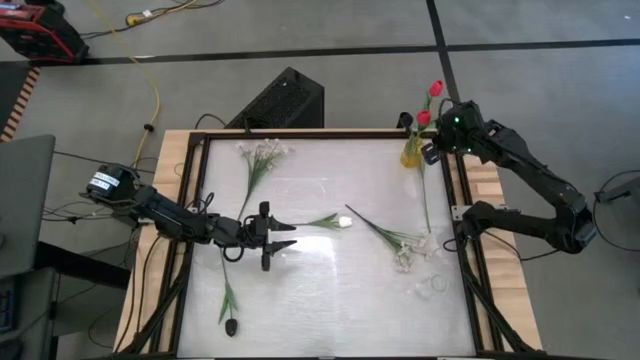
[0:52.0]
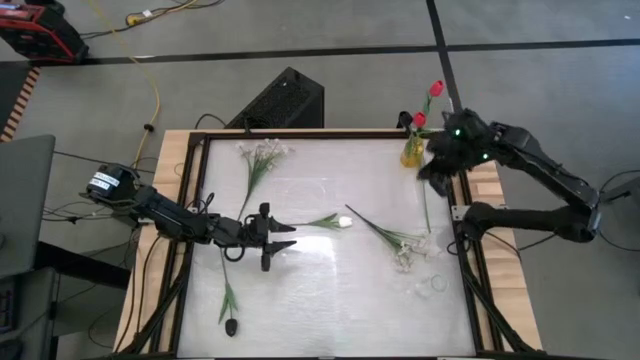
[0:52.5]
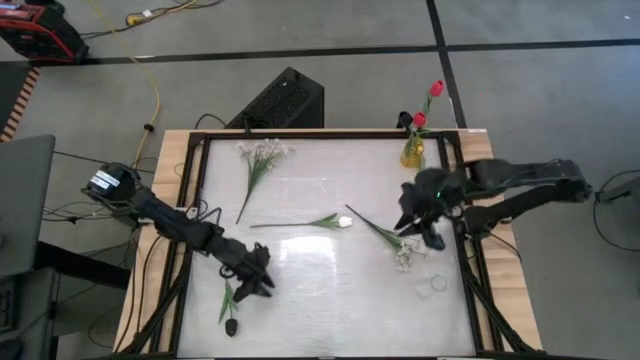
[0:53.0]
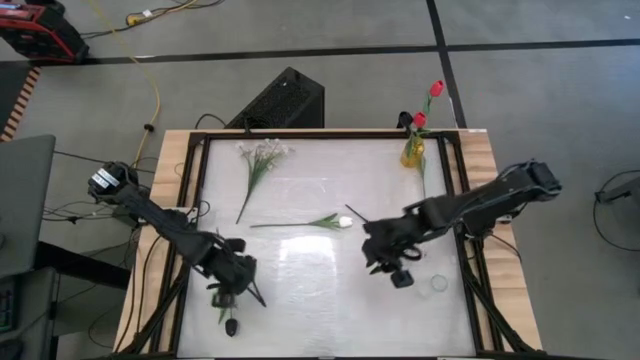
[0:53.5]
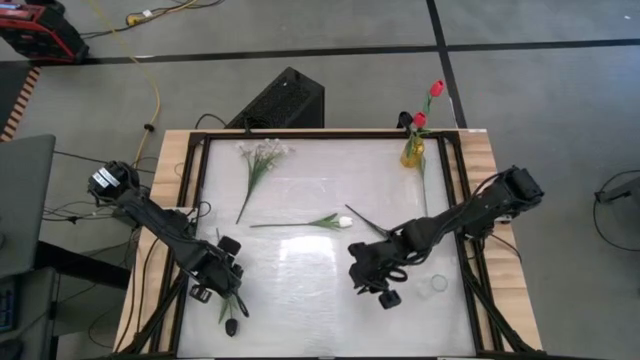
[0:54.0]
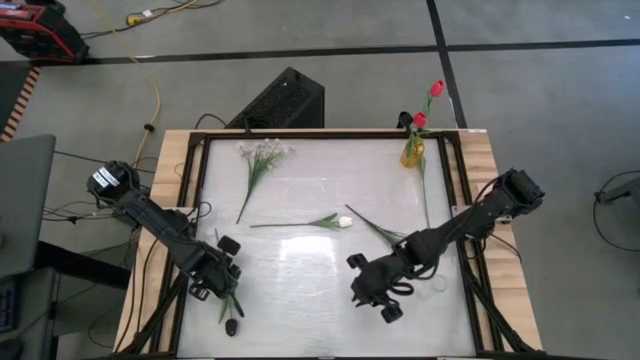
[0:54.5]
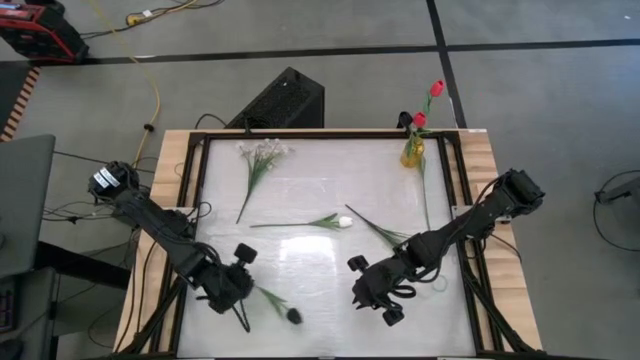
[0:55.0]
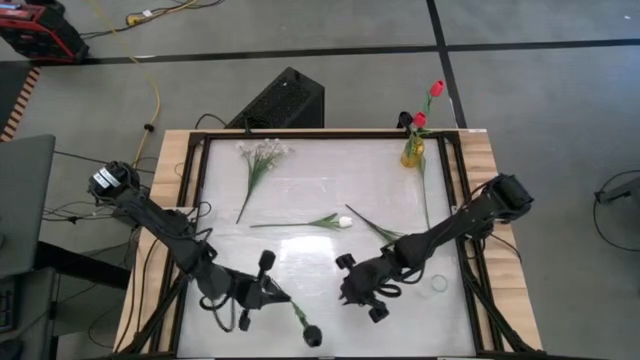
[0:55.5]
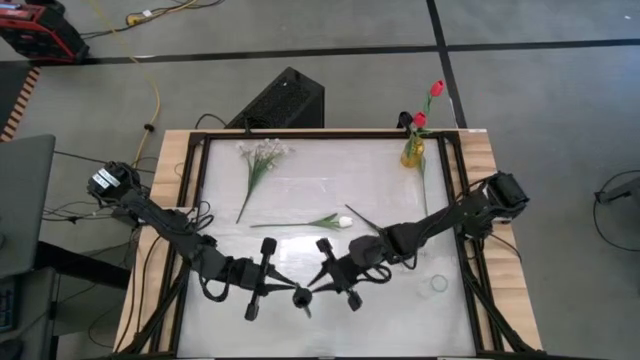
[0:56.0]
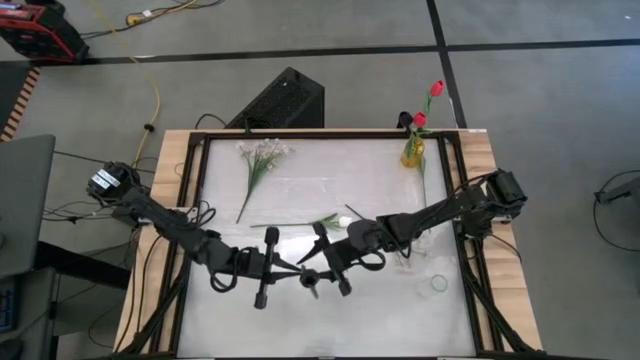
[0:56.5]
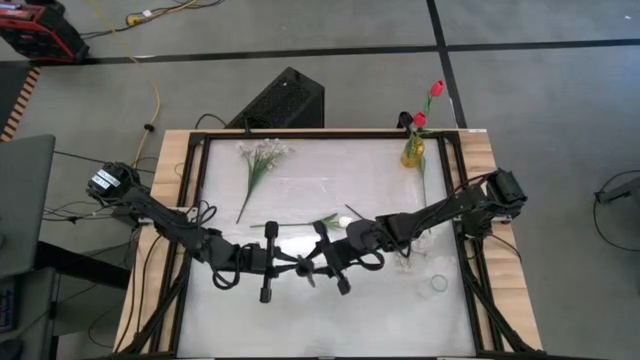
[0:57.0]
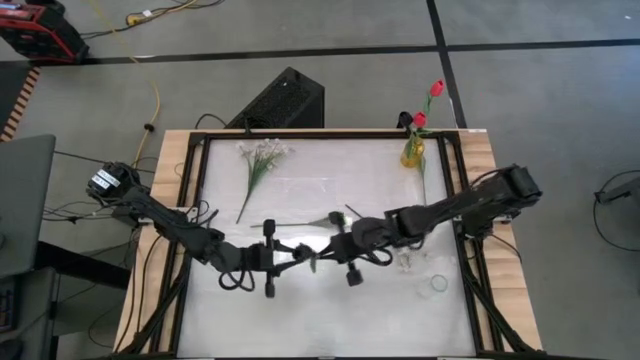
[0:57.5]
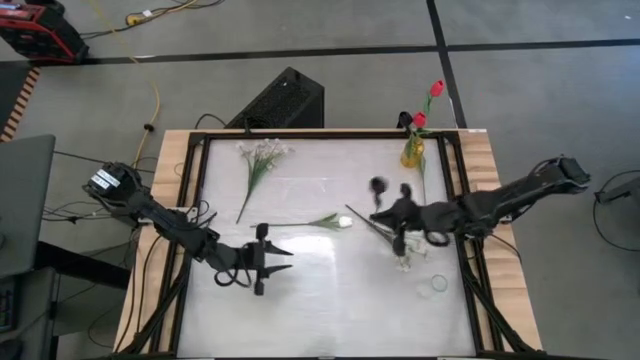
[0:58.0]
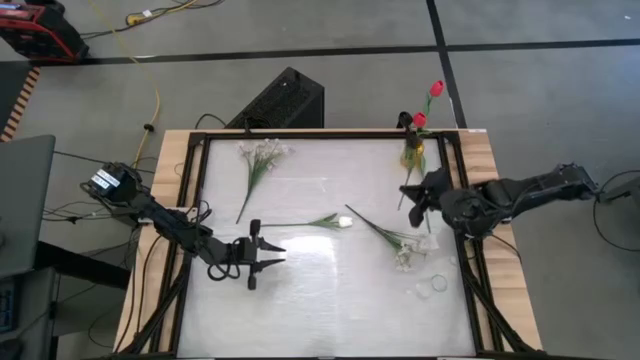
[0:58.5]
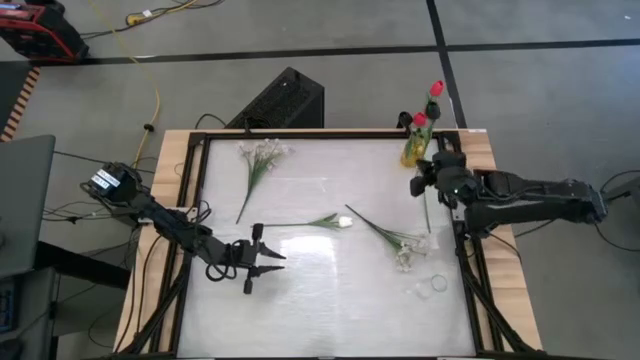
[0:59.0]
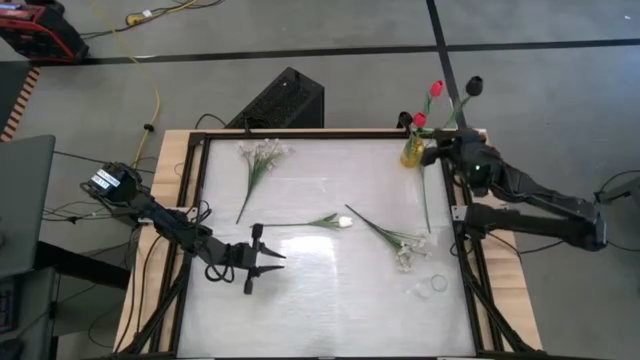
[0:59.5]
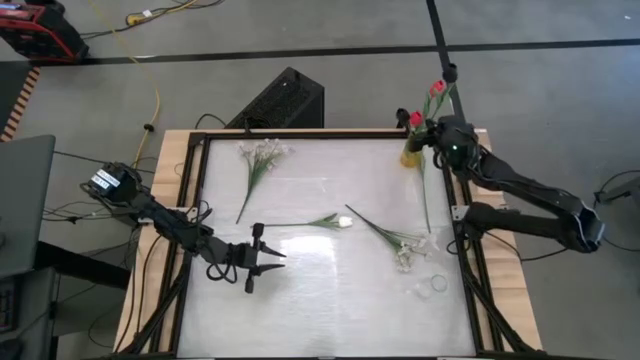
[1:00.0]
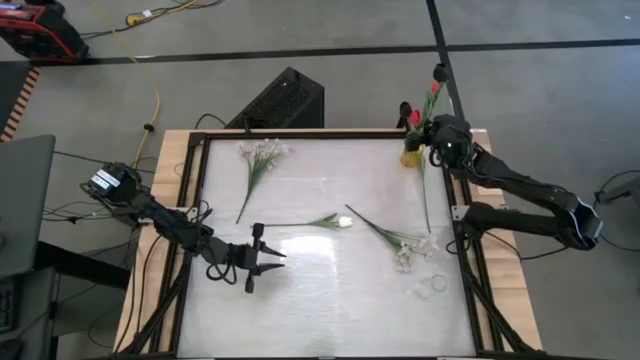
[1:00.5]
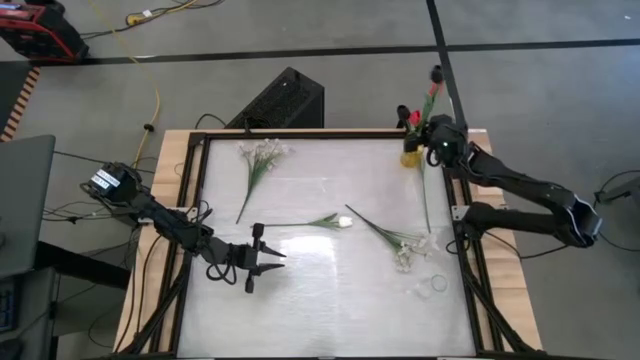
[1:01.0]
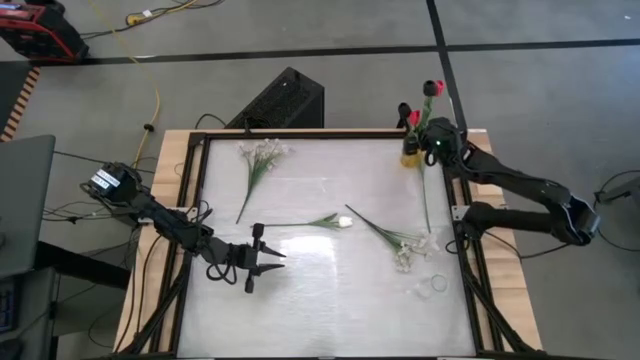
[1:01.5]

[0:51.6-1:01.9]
Task: Sort flowers into vase by color
Put the black flower into the yellow flower vase

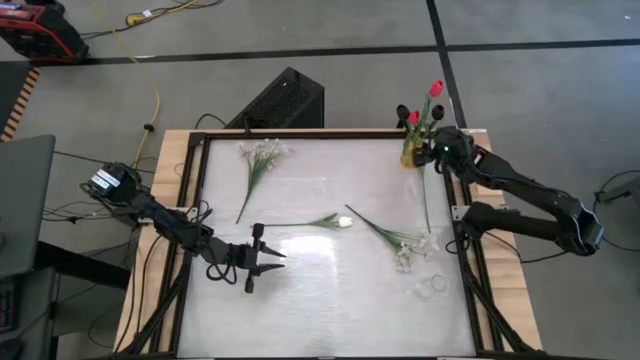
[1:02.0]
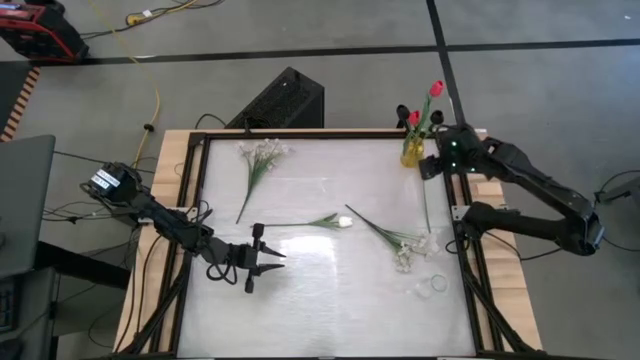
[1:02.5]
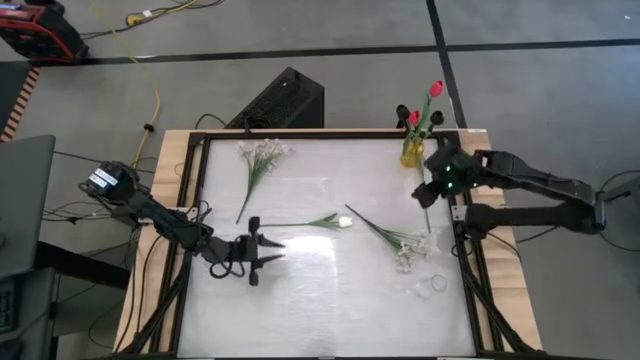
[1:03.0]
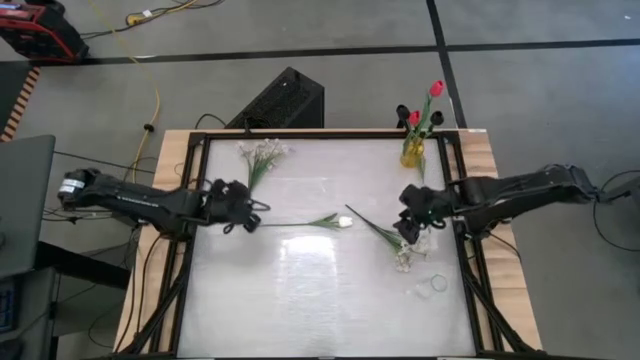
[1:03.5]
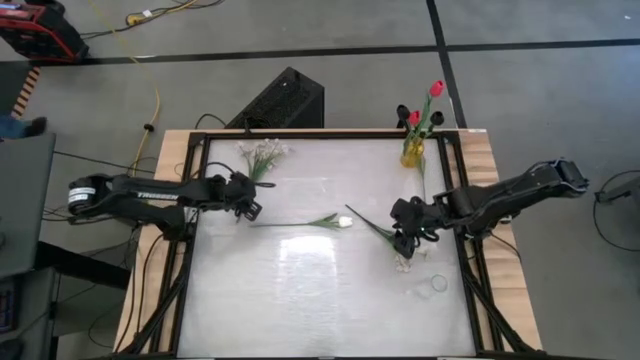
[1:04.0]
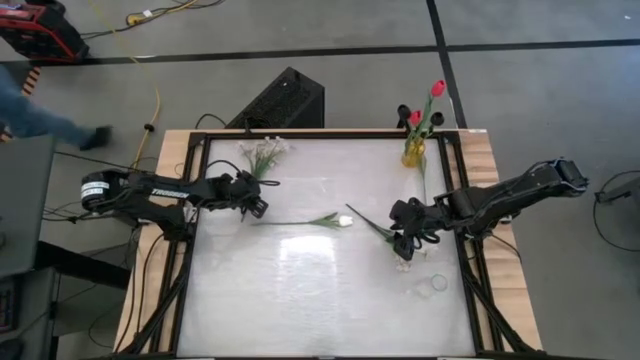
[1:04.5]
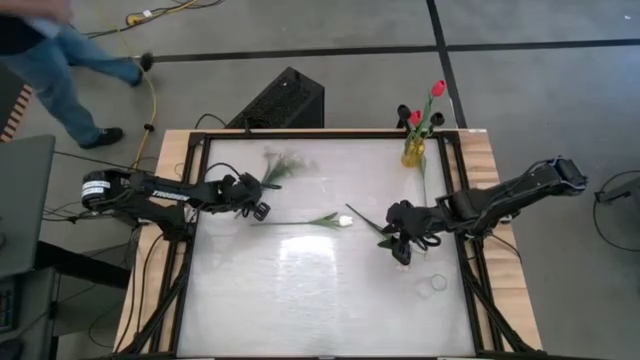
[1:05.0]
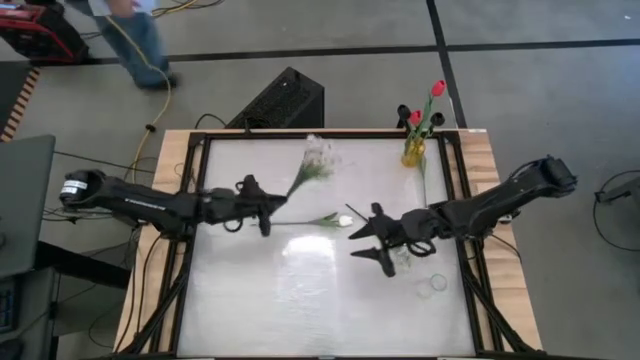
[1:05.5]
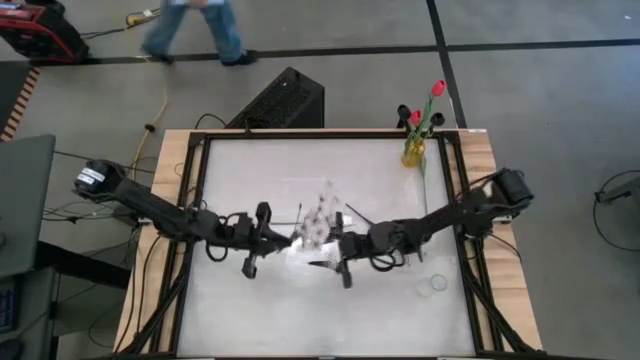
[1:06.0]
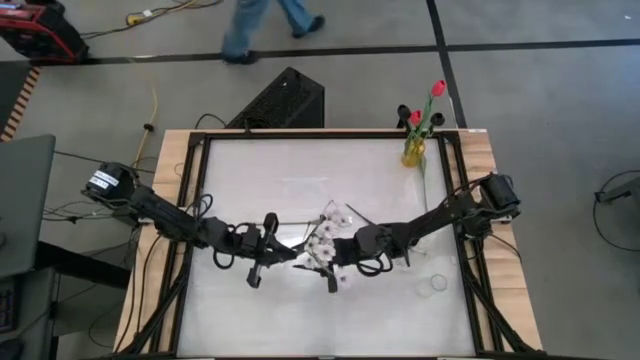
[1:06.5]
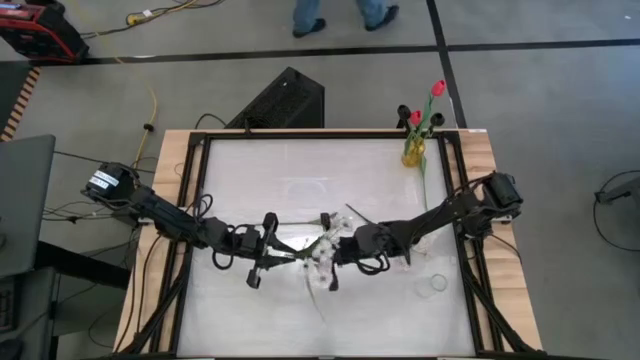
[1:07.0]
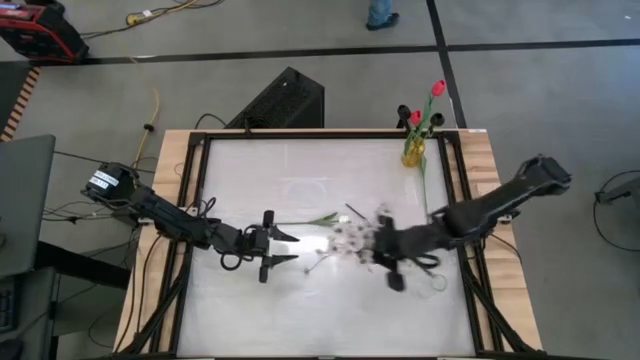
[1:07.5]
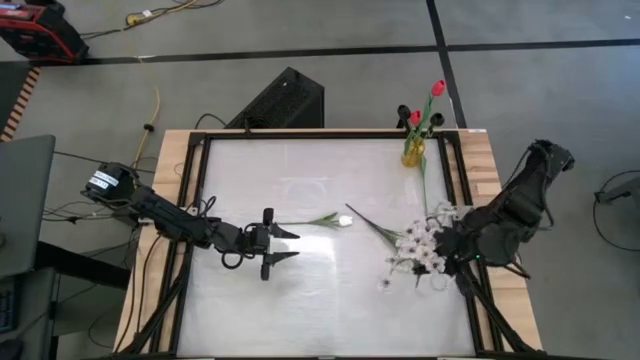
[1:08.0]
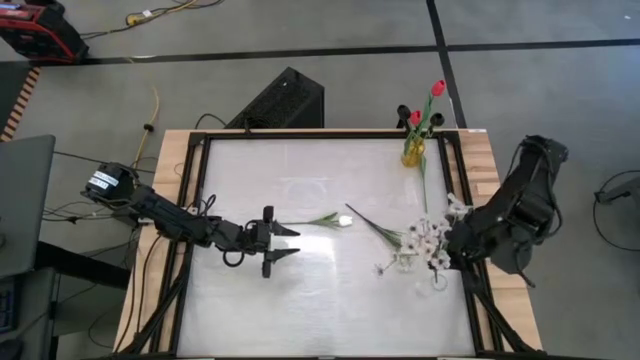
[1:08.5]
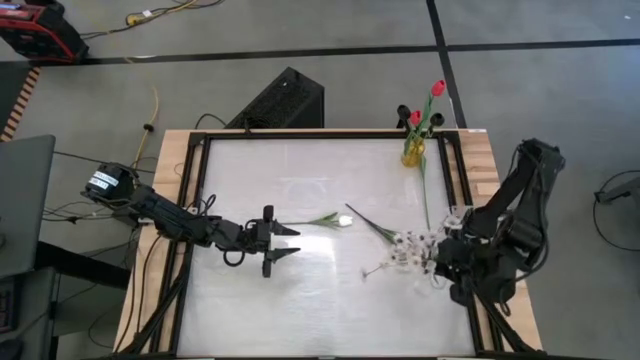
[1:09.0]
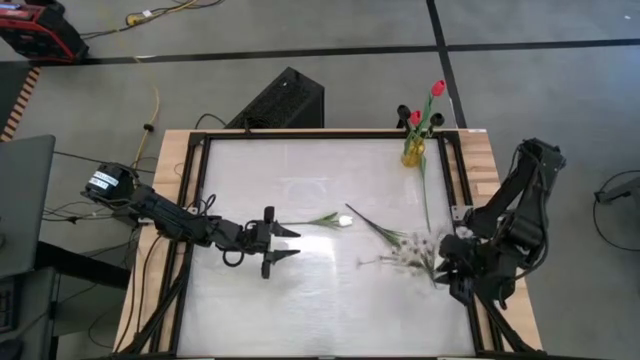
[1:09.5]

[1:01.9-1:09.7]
Put the top white flower into the transparent flower vase

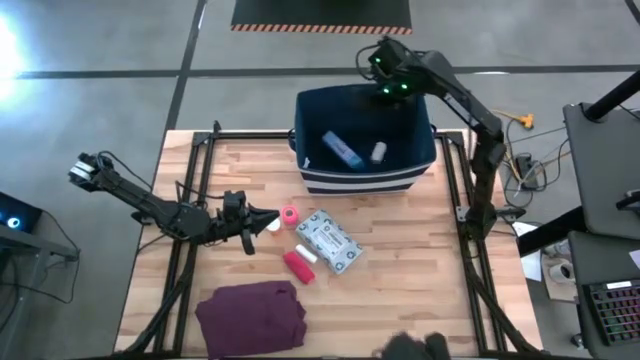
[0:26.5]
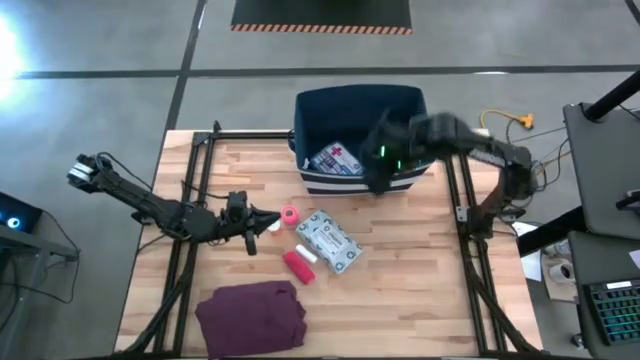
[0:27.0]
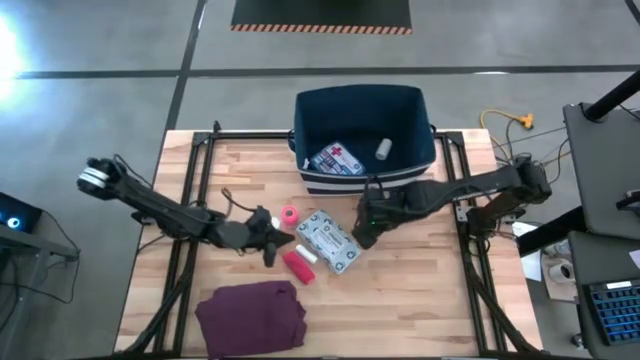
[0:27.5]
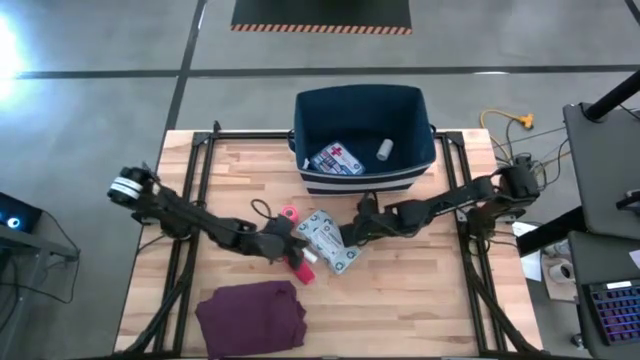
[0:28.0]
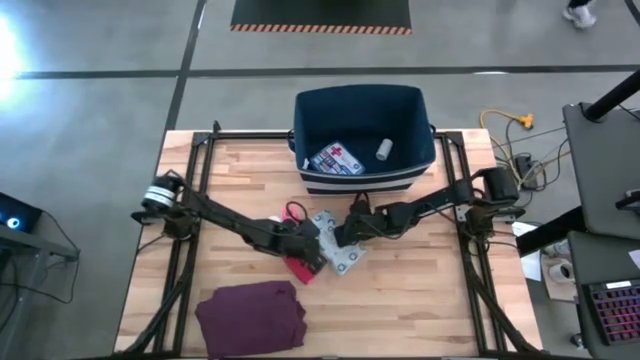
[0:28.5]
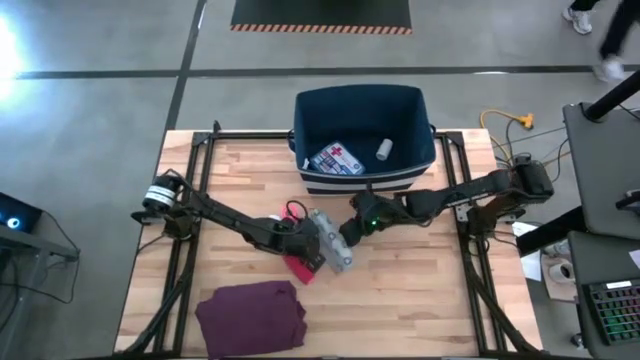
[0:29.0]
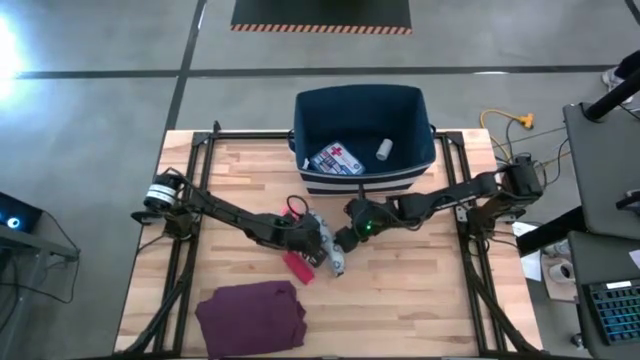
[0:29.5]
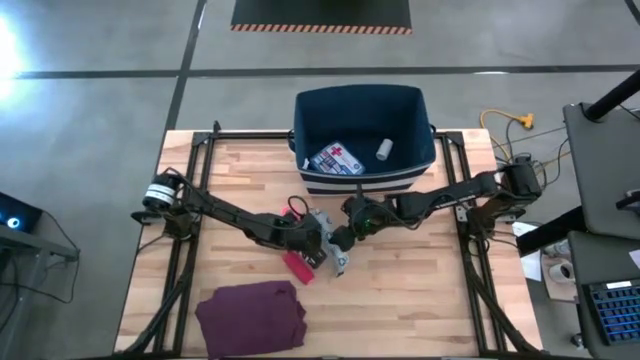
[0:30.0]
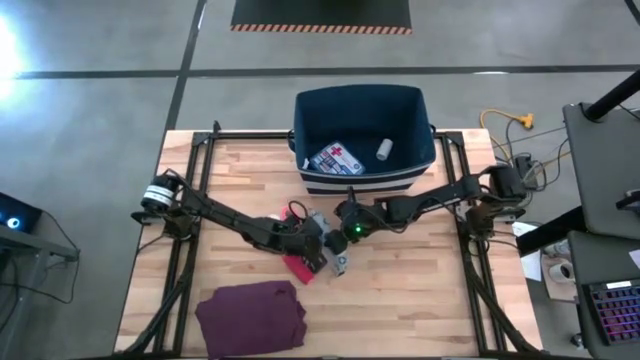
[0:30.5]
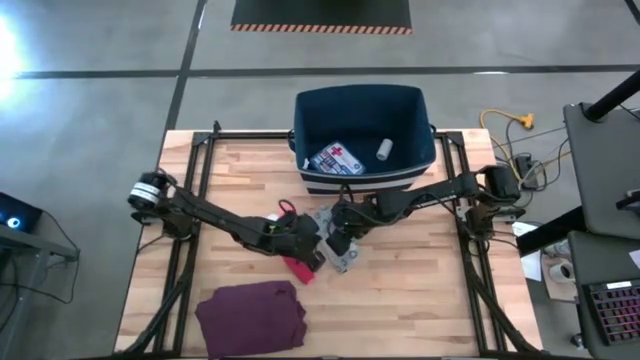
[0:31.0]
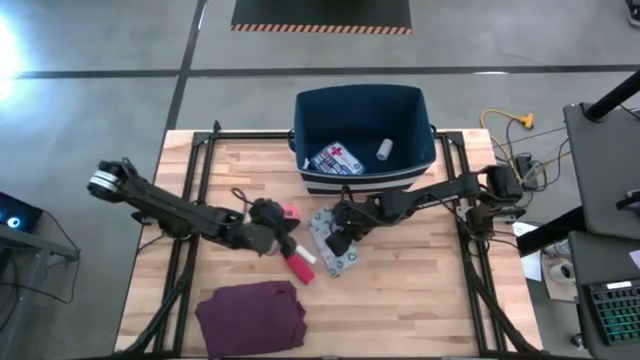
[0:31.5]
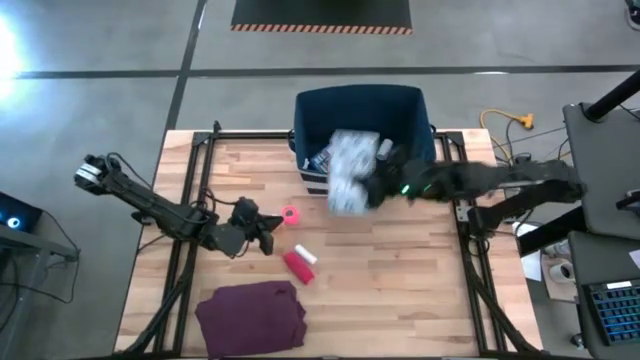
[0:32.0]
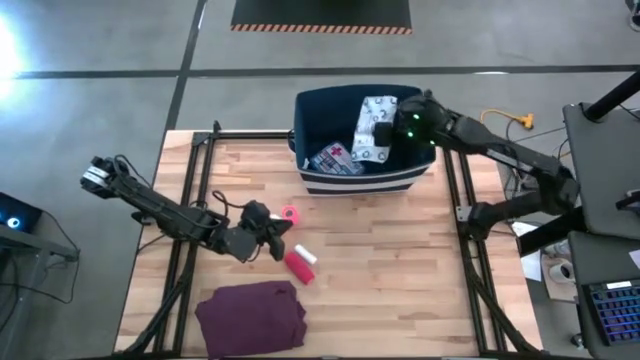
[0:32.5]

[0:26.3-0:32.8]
Task: Pick & place medical supplies in basket/bin
Put the white mailer bag into the blue bin
